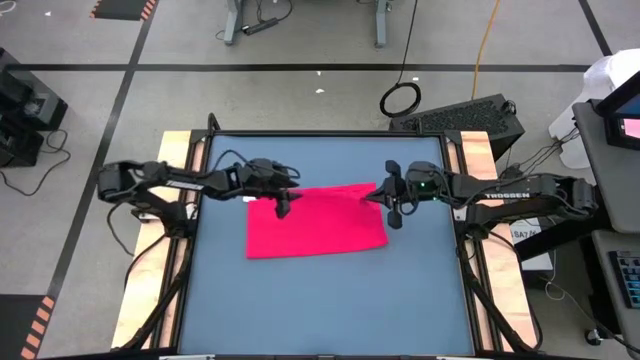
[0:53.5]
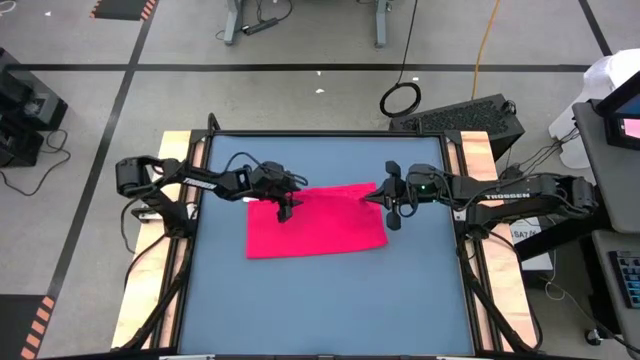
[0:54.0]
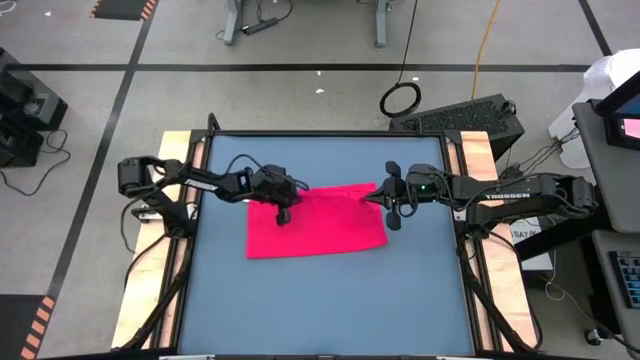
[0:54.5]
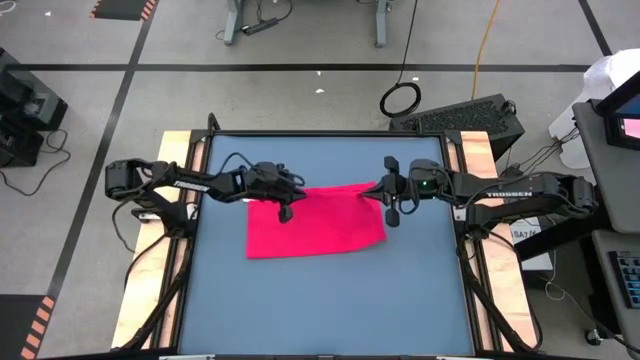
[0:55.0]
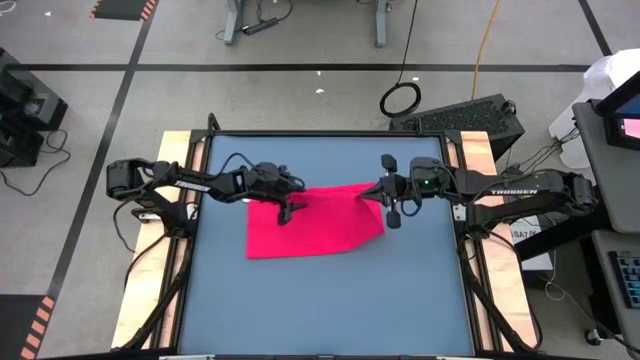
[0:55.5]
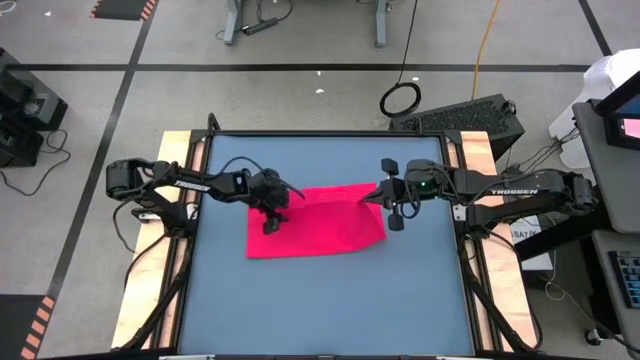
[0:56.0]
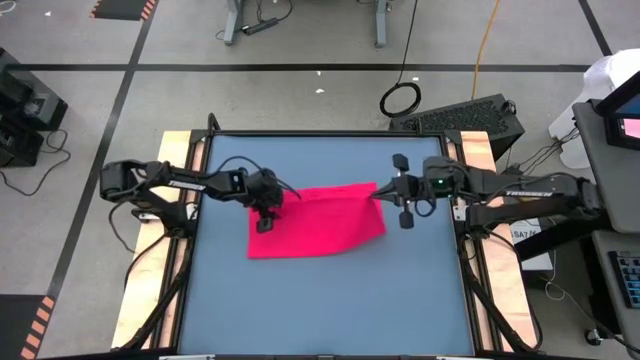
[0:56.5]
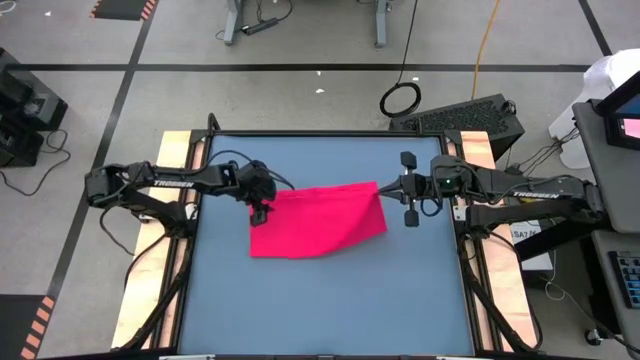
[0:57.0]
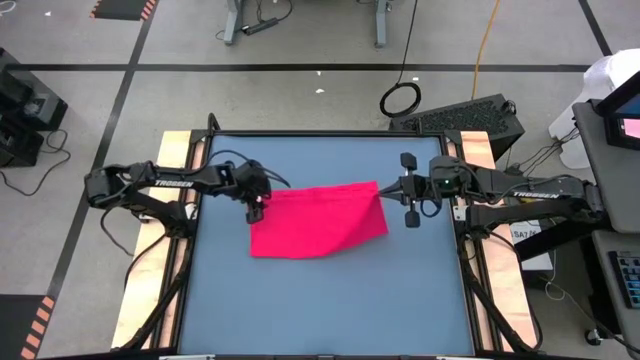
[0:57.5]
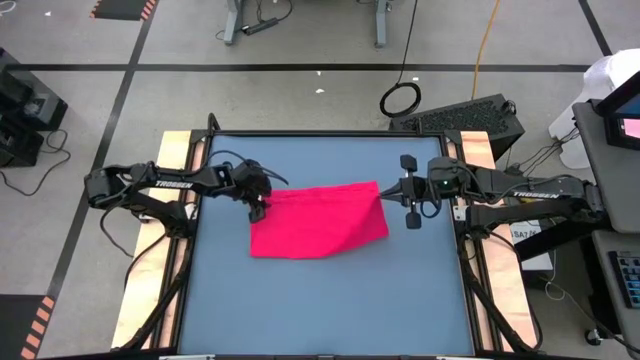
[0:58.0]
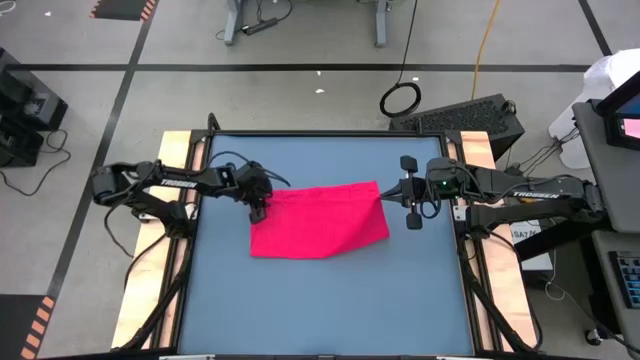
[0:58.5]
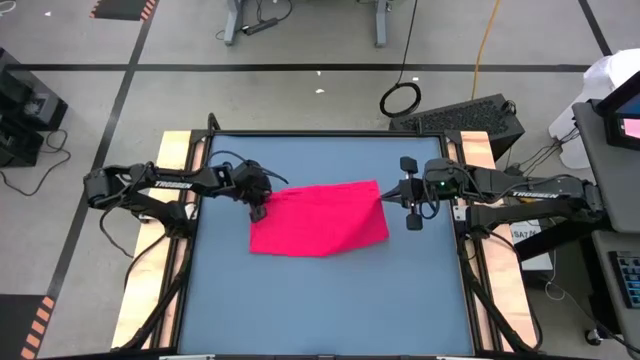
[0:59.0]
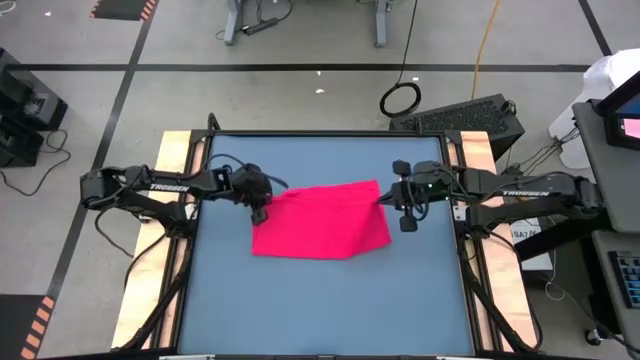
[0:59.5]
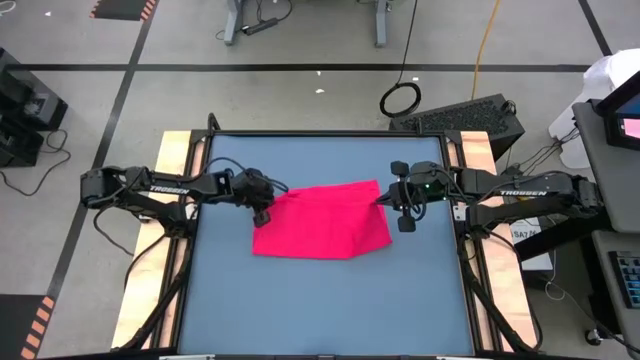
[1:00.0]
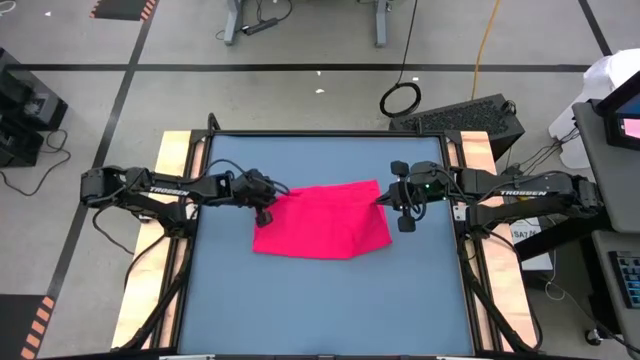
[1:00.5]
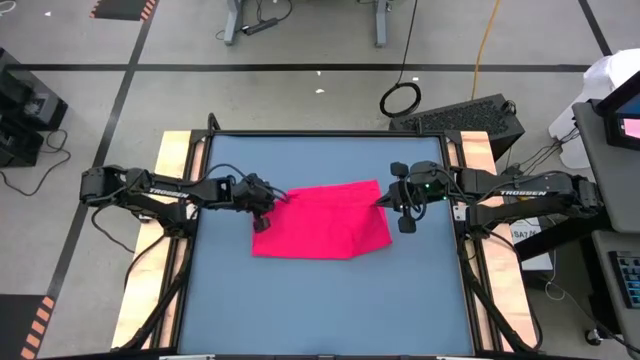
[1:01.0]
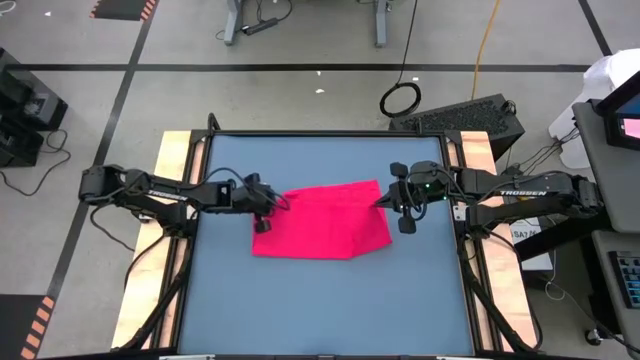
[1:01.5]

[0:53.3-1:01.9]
Task: Roll towel
Roll the red towel

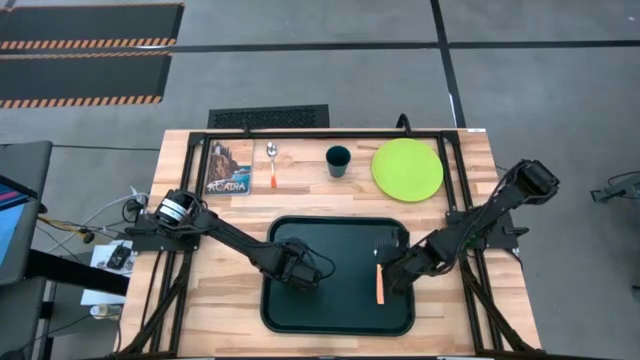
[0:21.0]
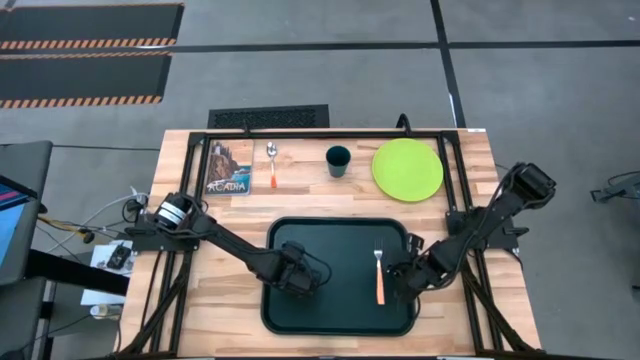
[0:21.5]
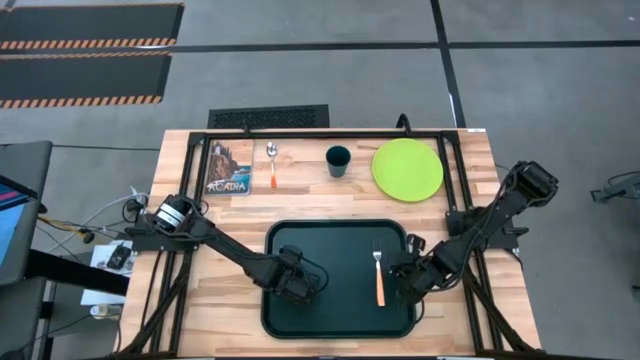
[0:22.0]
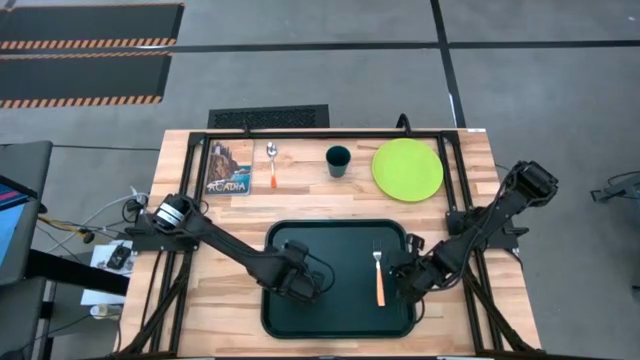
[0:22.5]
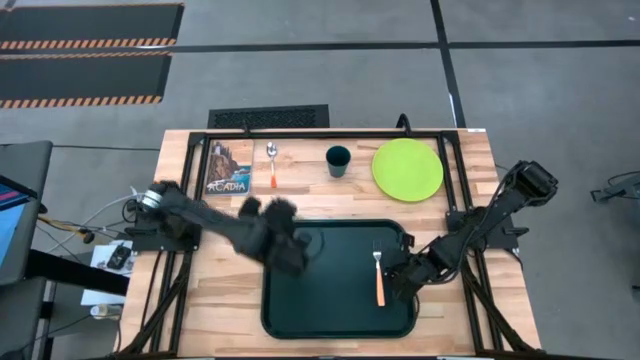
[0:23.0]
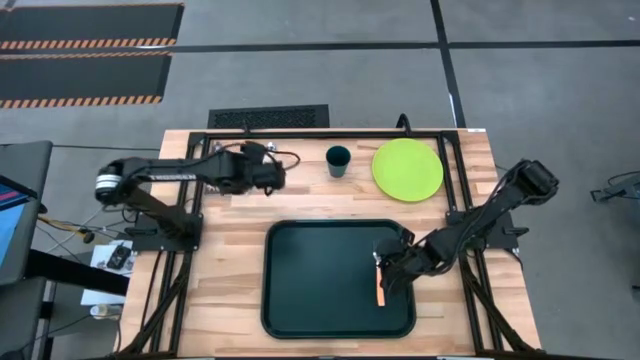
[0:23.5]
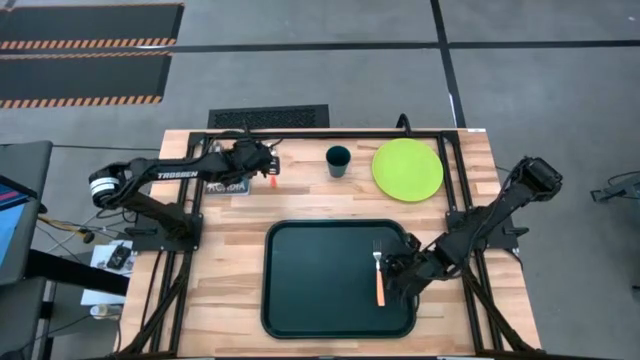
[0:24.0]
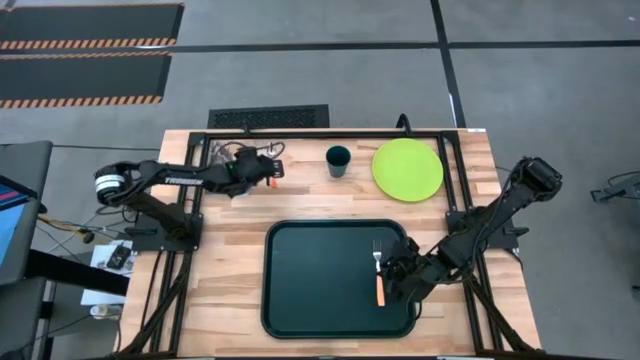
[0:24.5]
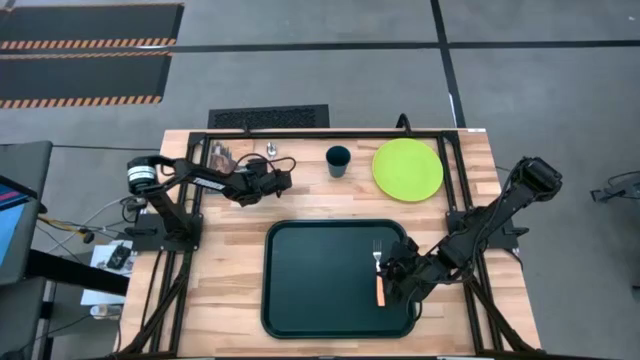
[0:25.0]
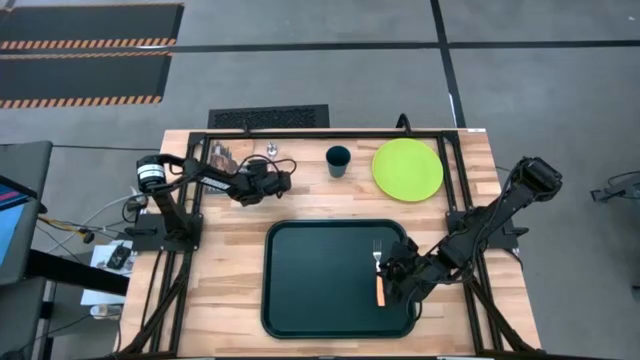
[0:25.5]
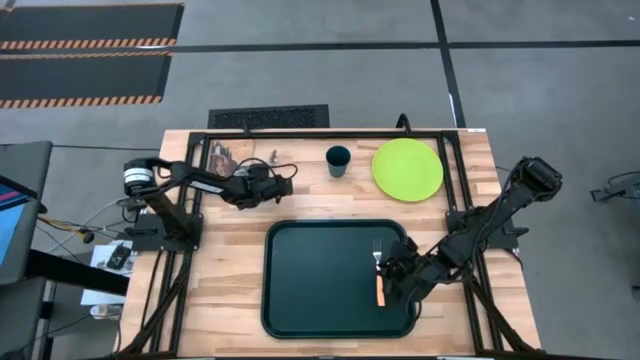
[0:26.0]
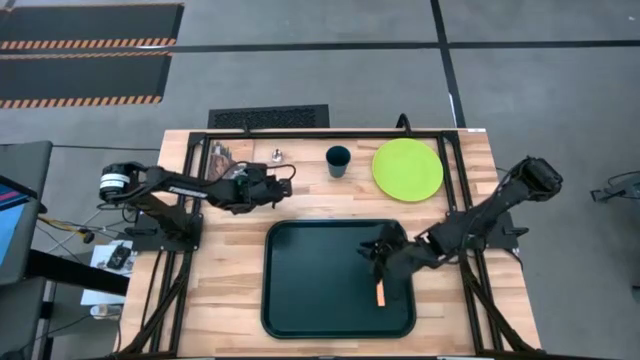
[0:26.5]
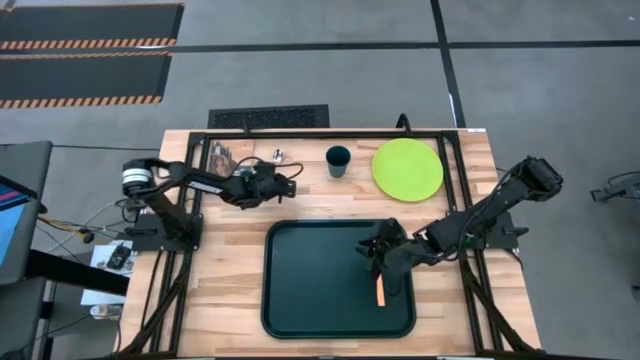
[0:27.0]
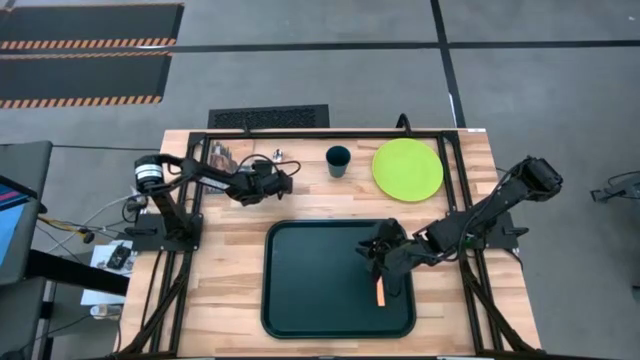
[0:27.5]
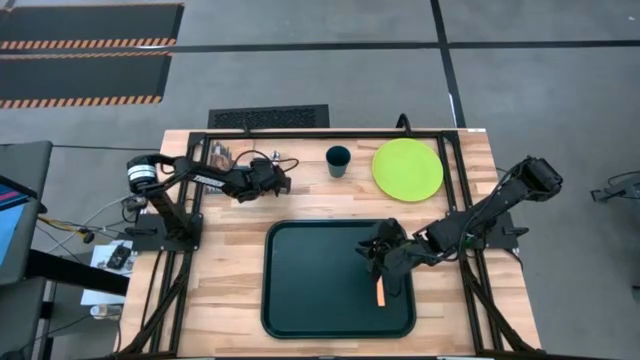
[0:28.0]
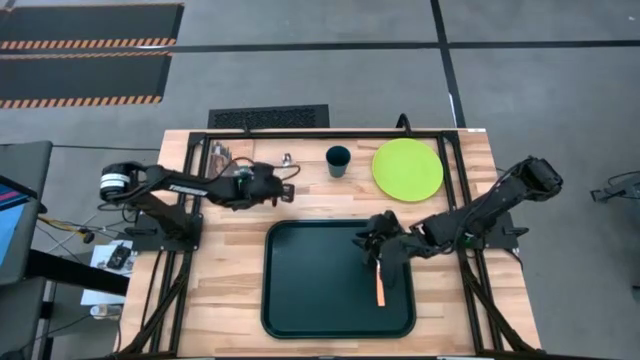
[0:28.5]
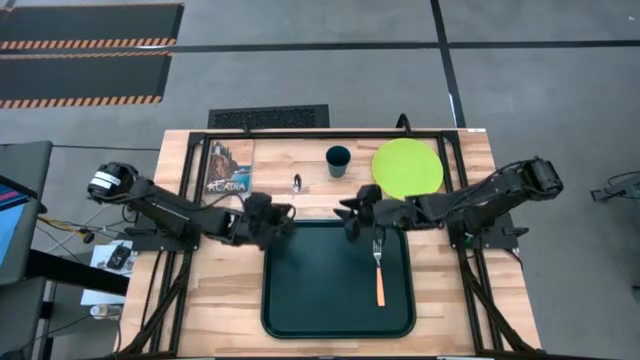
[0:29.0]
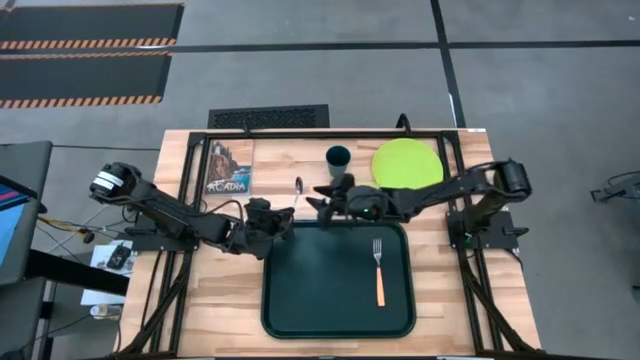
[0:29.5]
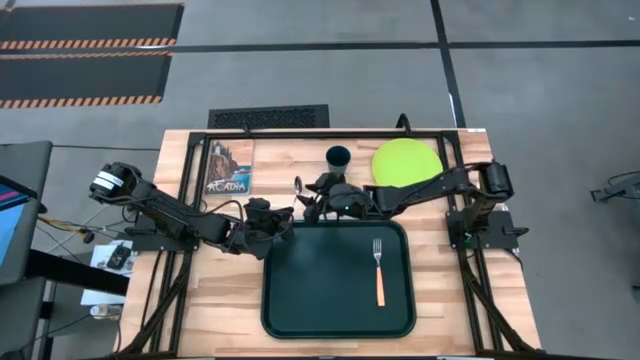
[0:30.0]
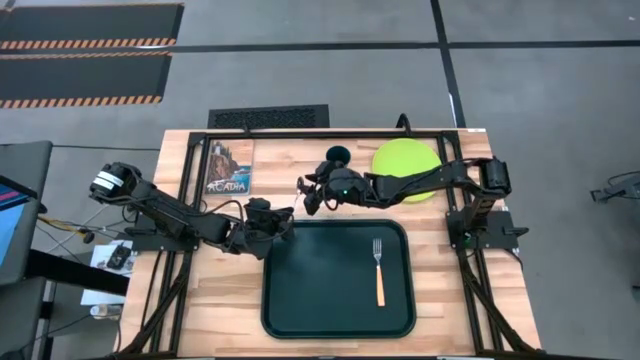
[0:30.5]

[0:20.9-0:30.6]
Task: Pick and place plate/cup/fork/spoon on tray
Put the orange spoon on the black serving tray to the right of the orange fork
